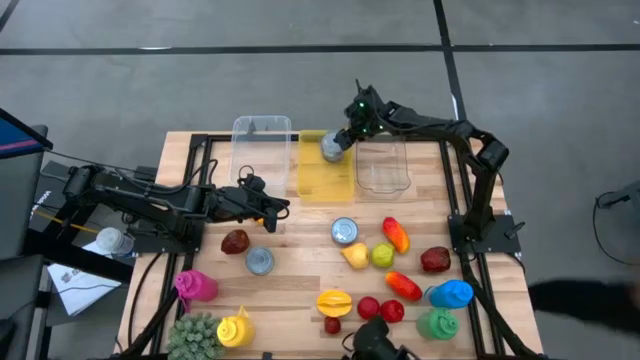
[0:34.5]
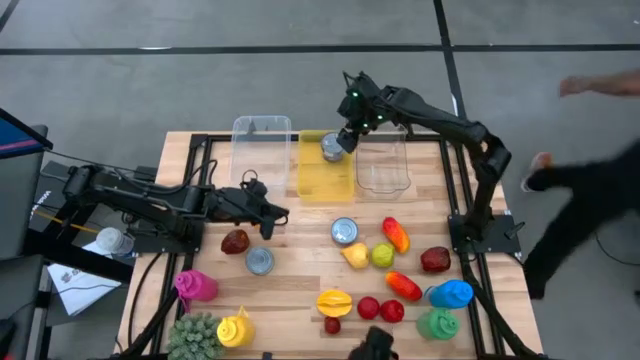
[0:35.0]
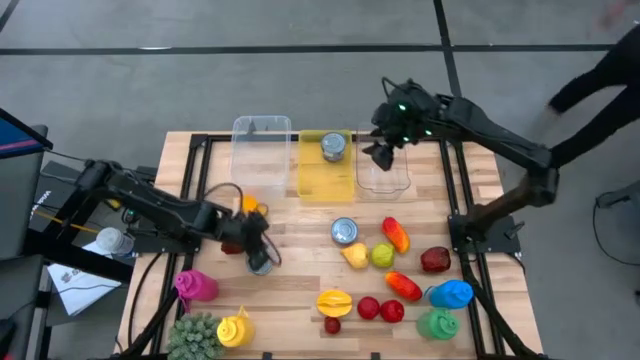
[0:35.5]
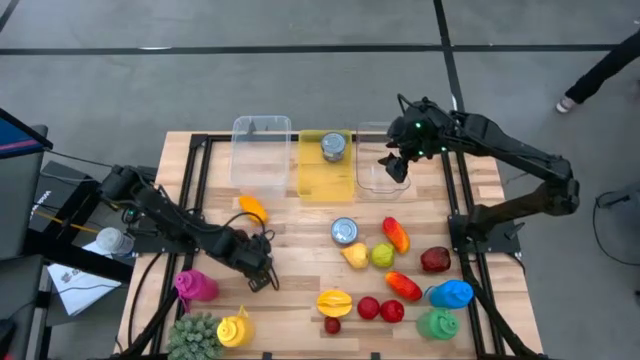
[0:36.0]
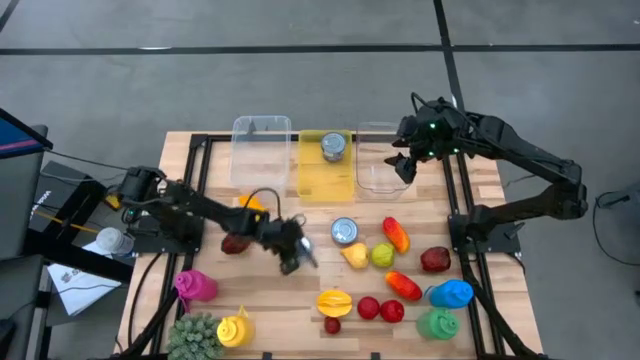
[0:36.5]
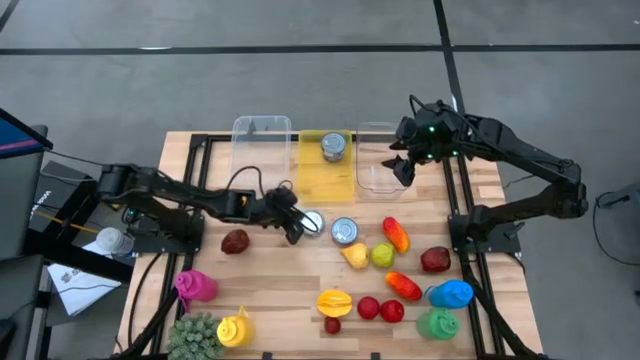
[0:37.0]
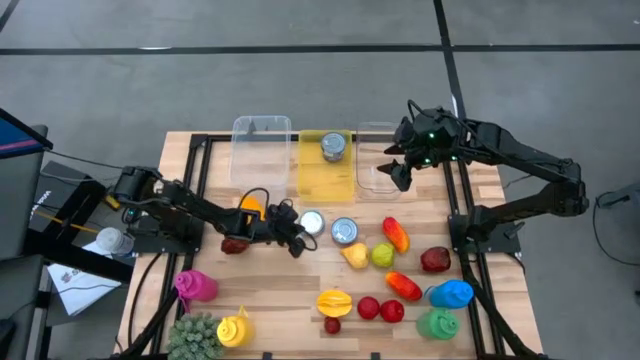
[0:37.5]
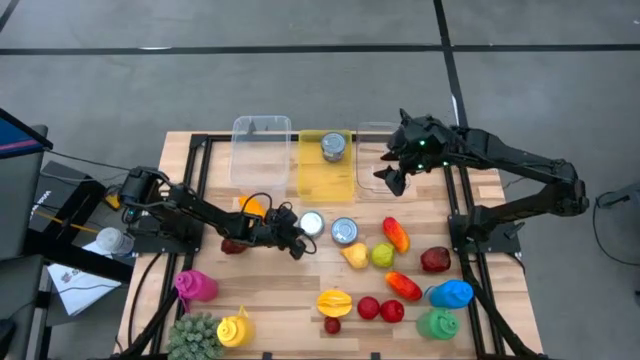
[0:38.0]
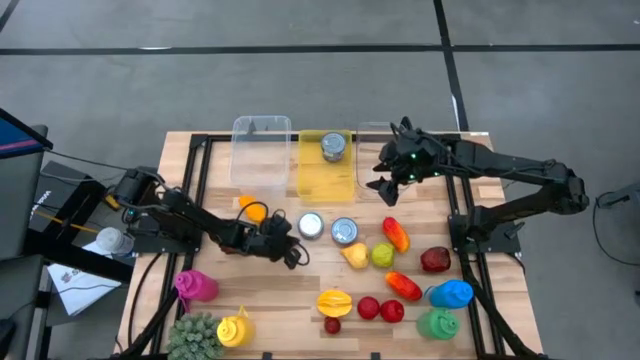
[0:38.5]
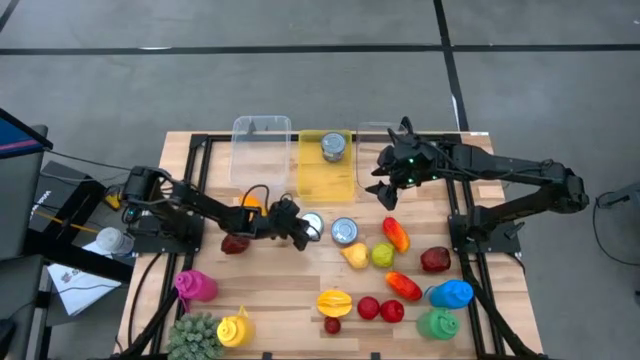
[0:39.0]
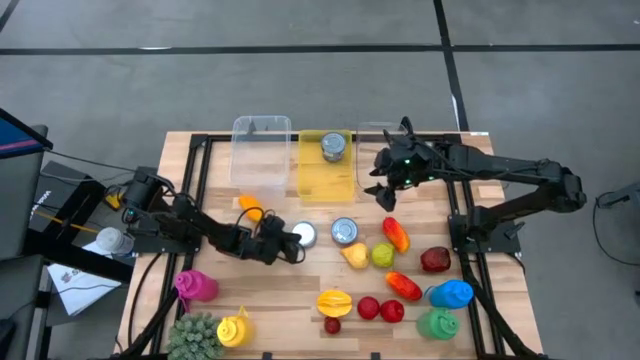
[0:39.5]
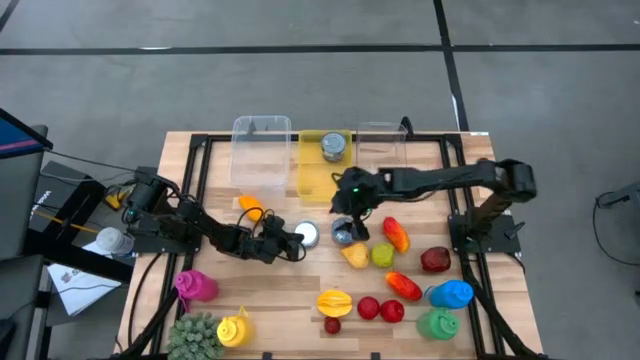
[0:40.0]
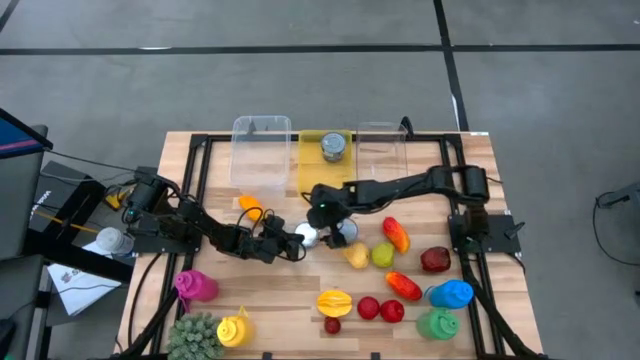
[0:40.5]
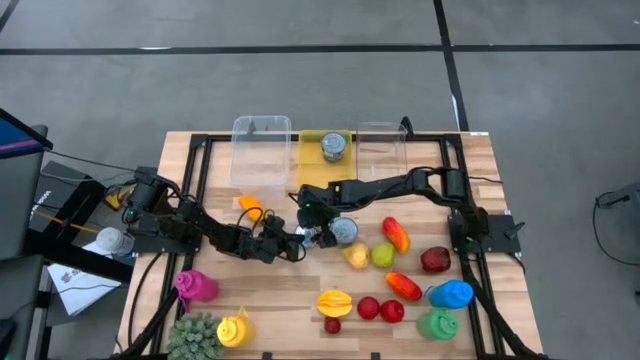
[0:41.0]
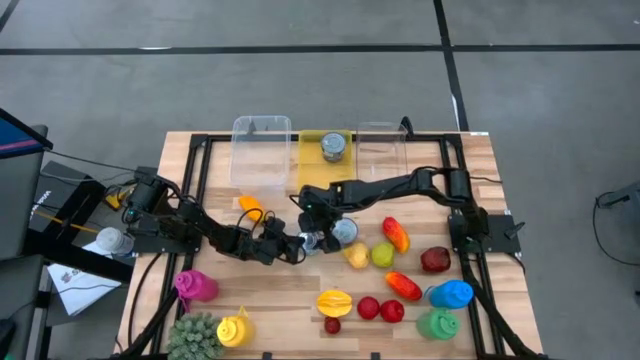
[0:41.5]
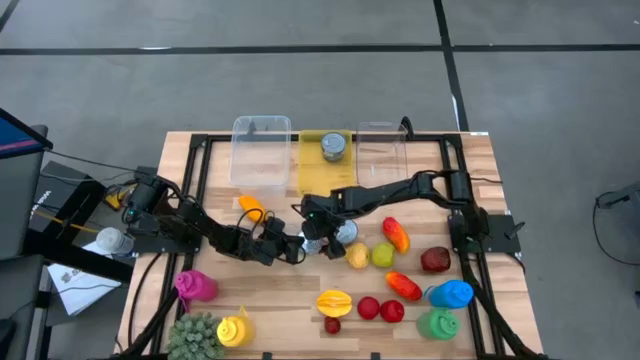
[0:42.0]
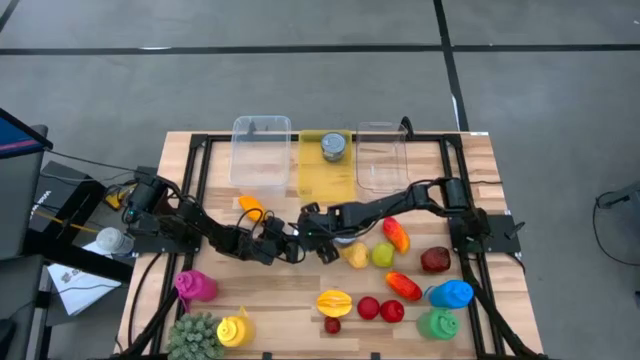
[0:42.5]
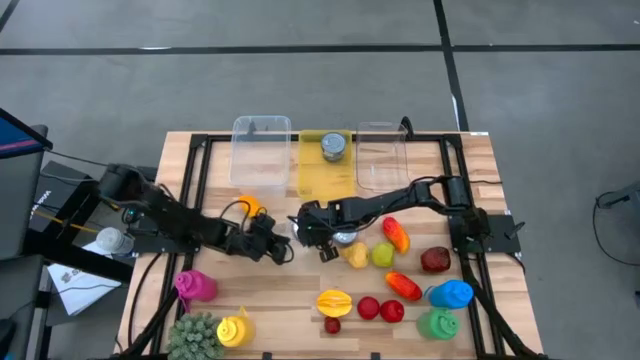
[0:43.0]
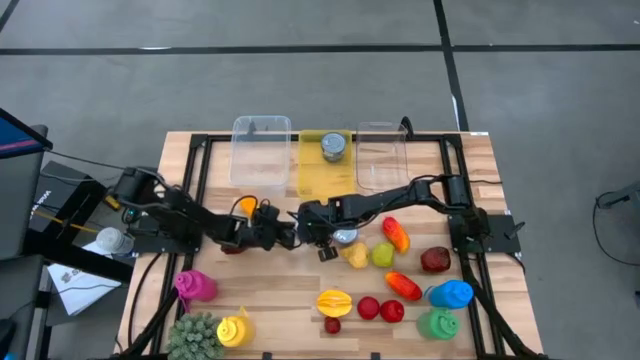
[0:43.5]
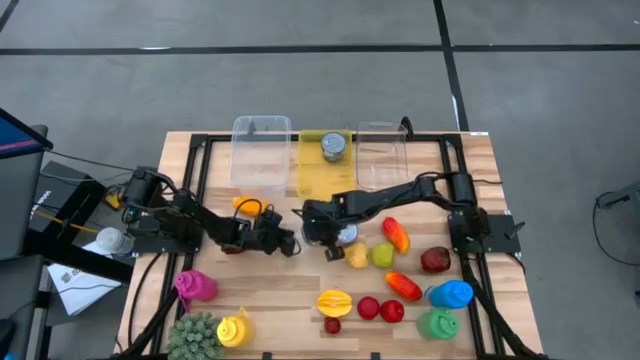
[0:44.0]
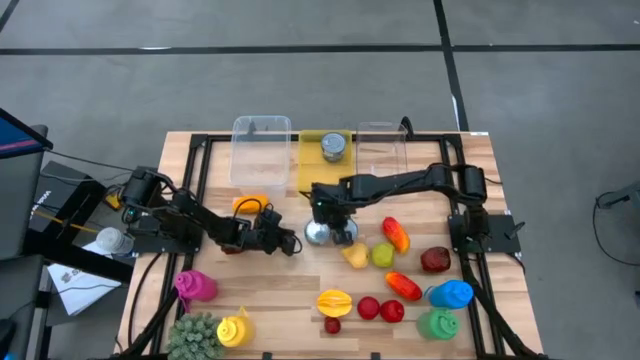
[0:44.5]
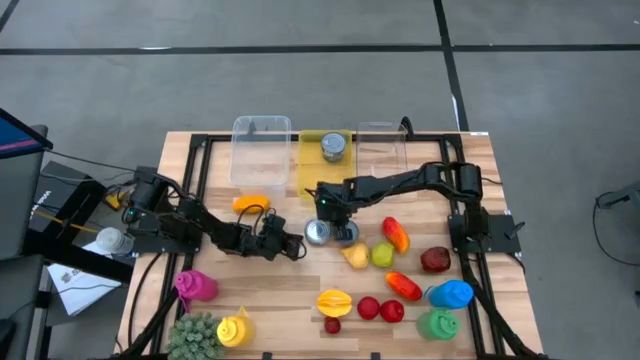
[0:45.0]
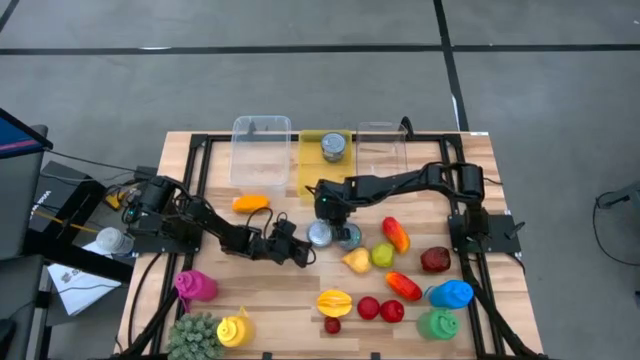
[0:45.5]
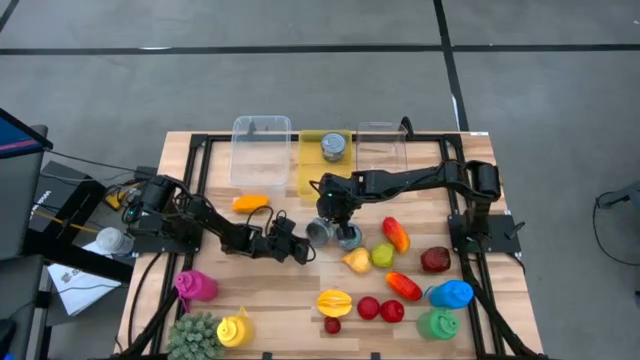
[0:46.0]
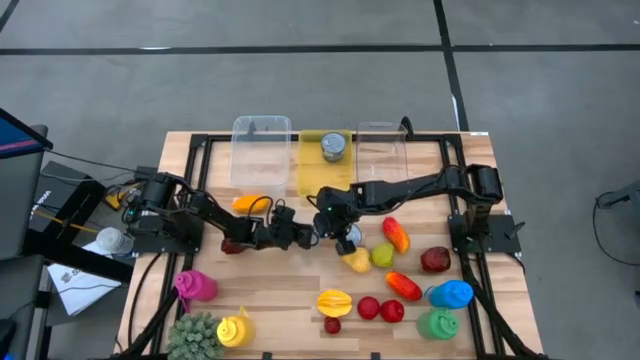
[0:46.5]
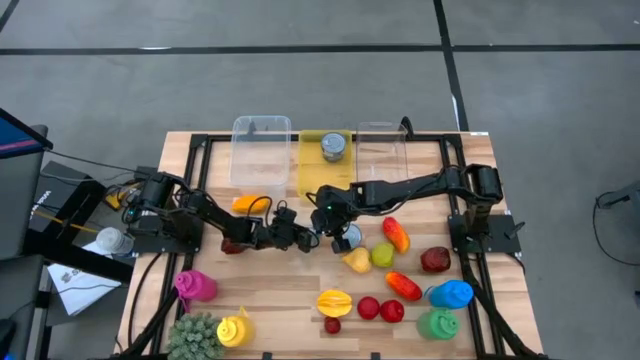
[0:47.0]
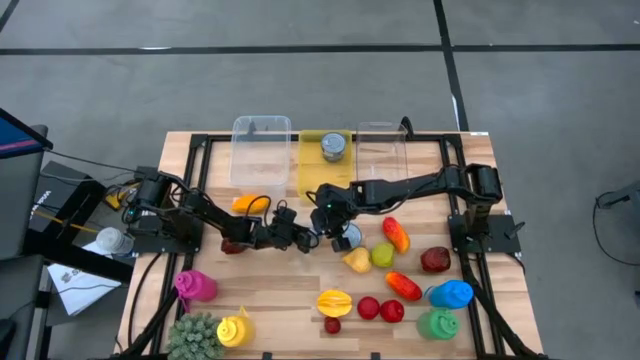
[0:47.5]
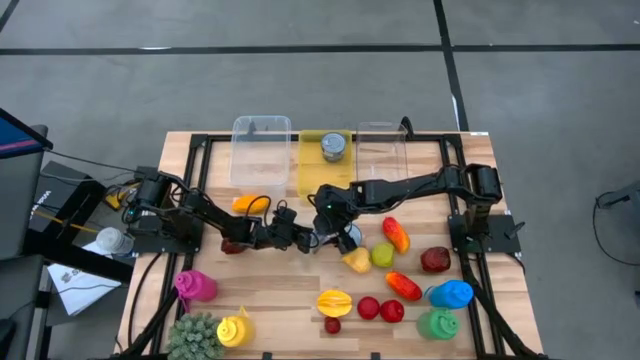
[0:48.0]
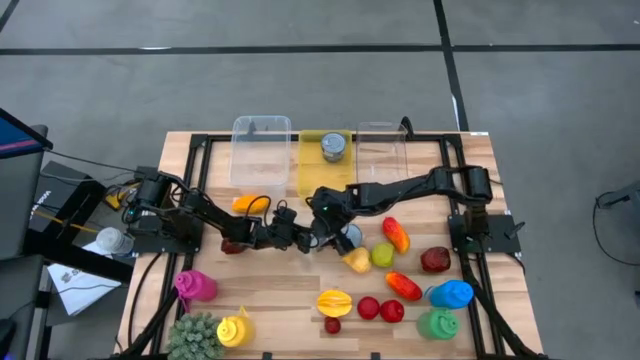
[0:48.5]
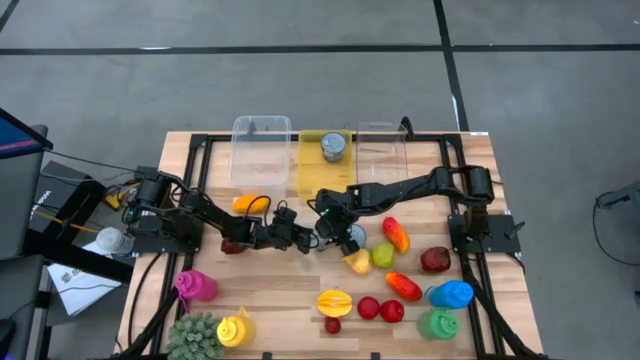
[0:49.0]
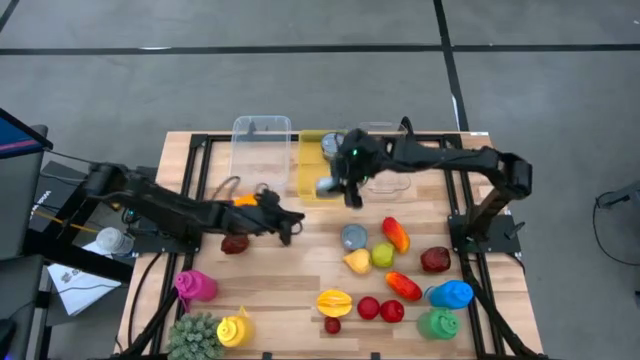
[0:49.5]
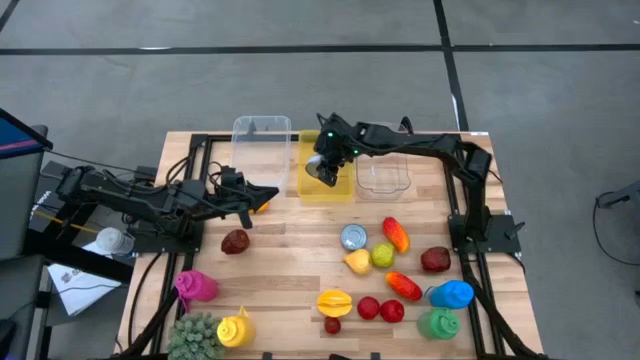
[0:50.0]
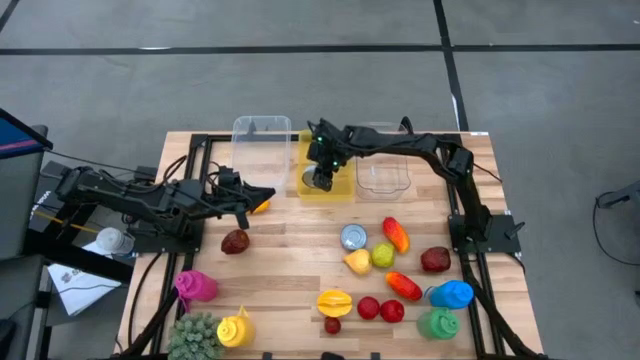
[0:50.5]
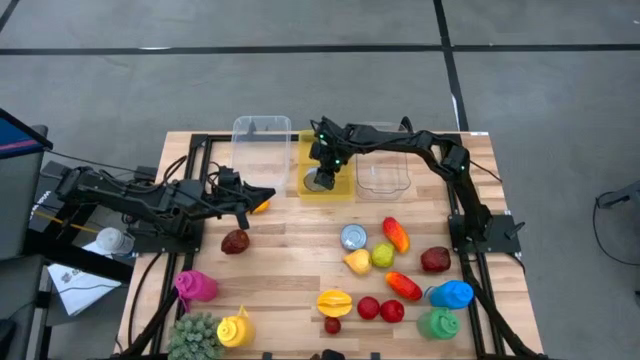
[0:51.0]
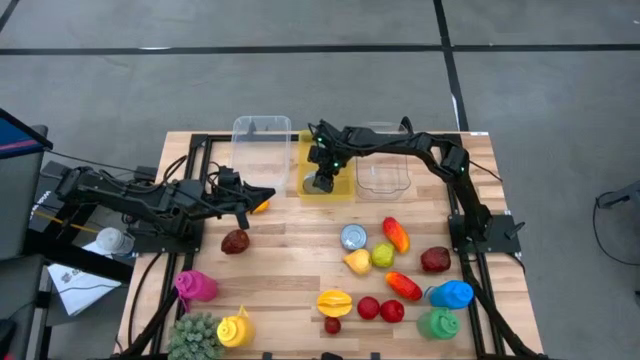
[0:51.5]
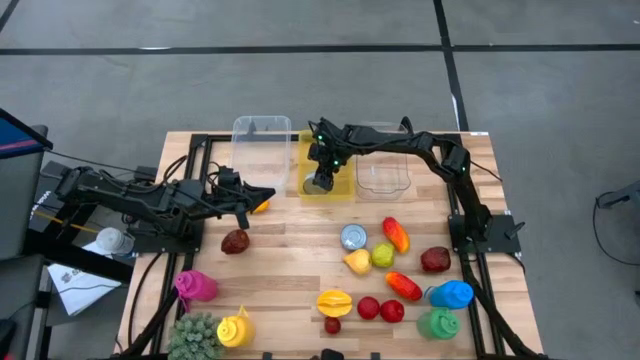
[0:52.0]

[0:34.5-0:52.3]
Task: Pick & Place Food Item
Put the green tuna can into the yellow bin

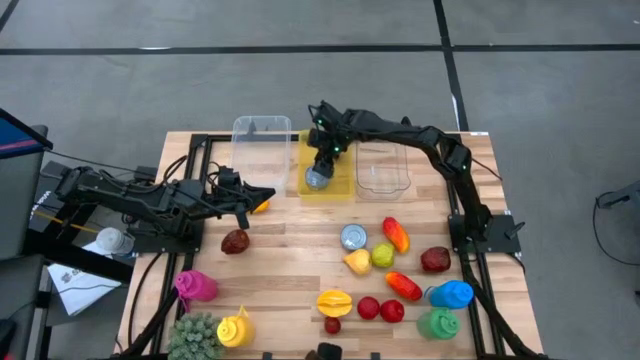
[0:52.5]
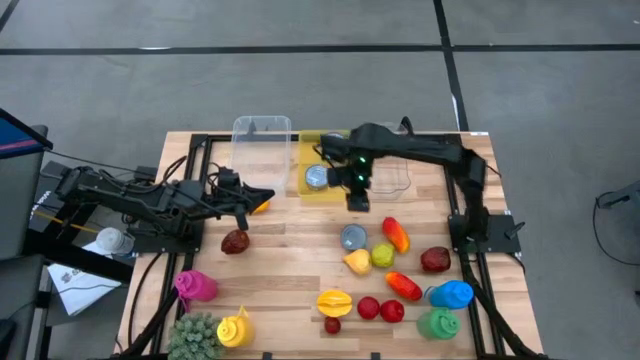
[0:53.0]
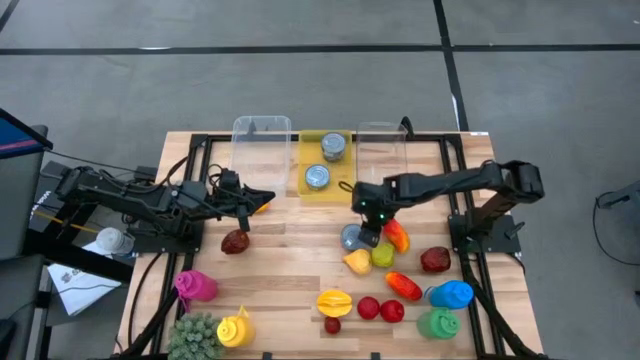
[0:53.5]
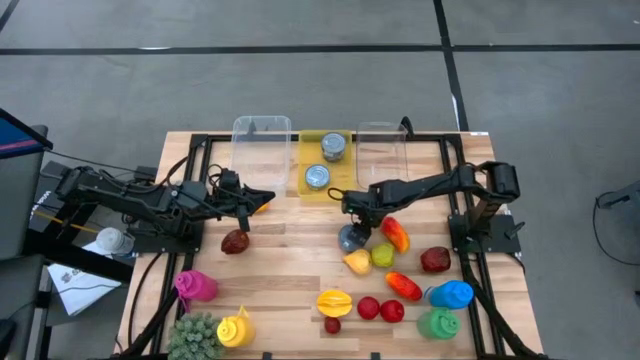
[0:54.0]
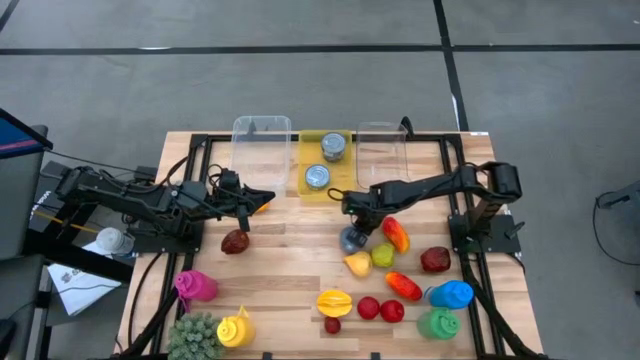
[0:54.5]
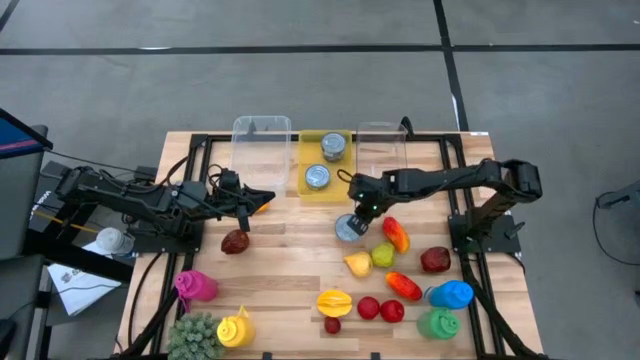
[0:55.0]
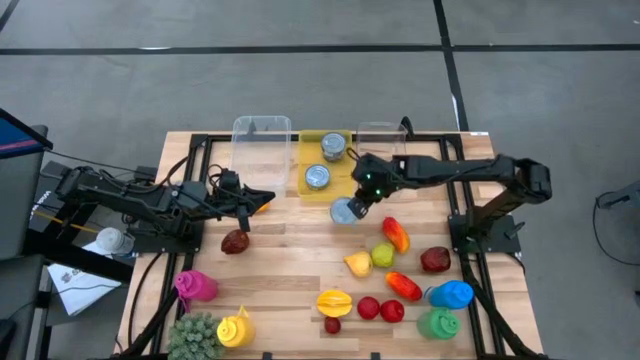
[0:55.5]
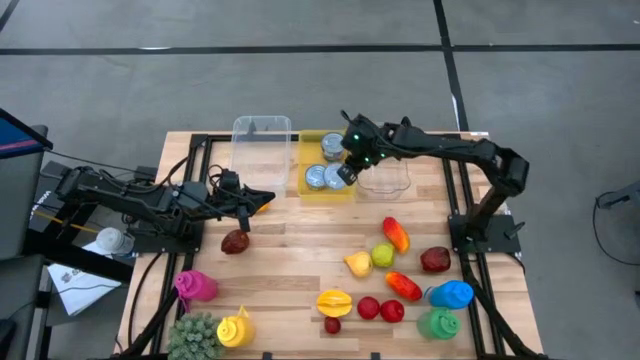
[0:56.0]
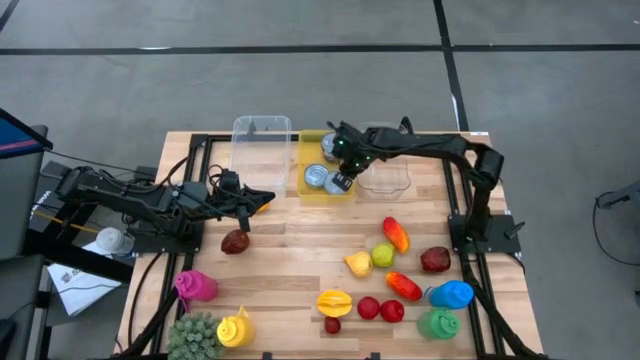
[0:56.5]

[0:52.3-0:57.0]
Put the red tuna can into the yellow bin
